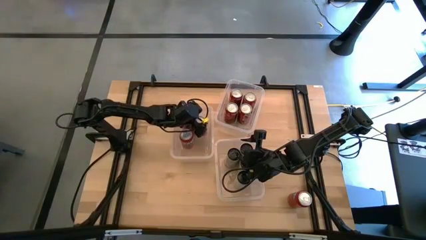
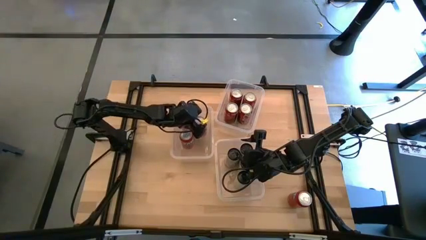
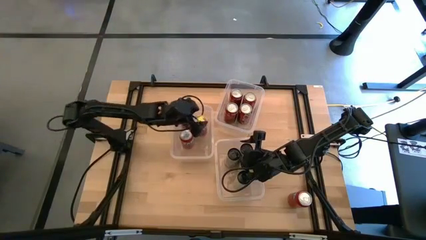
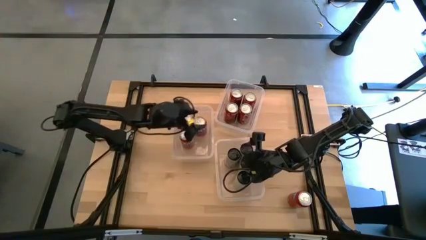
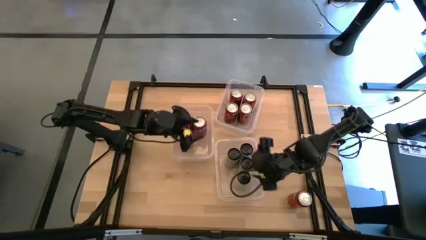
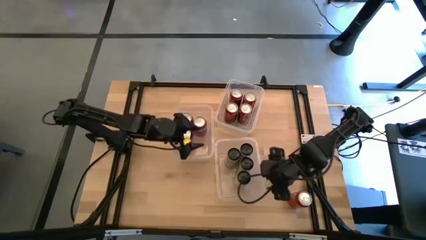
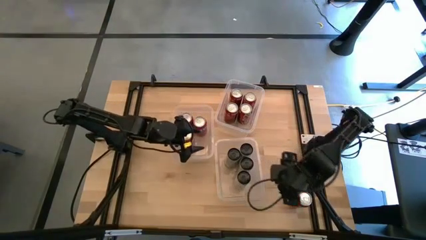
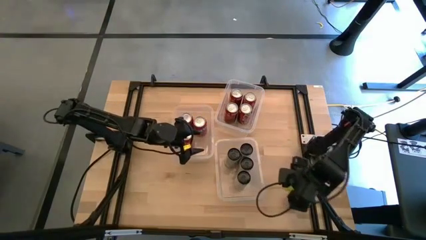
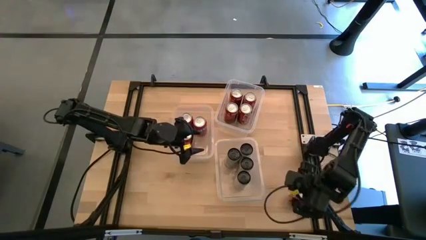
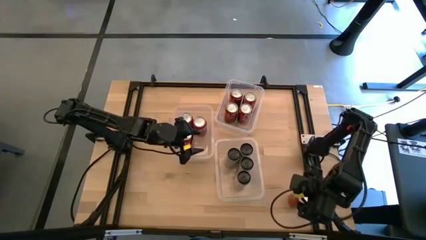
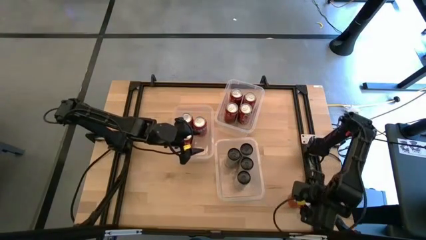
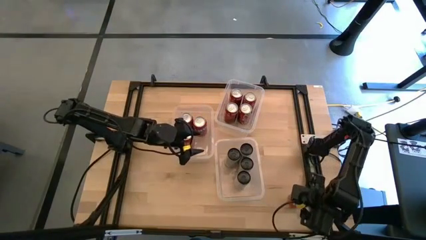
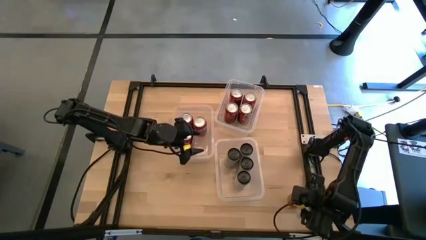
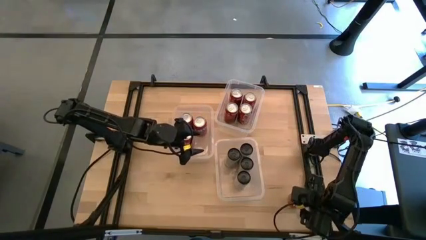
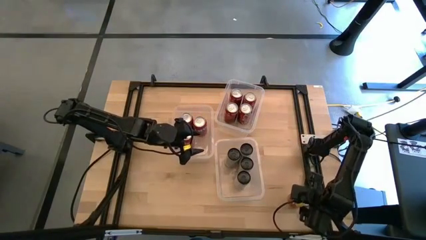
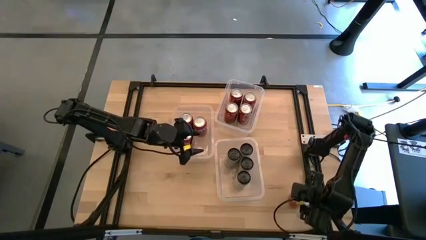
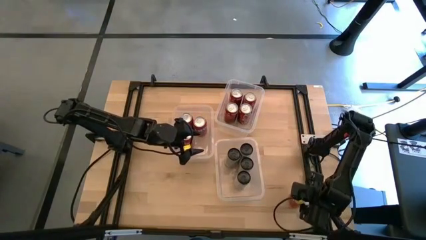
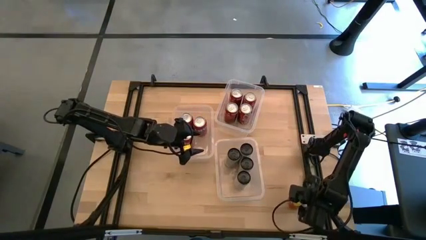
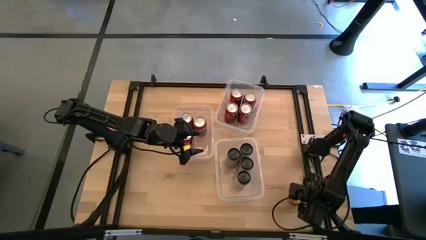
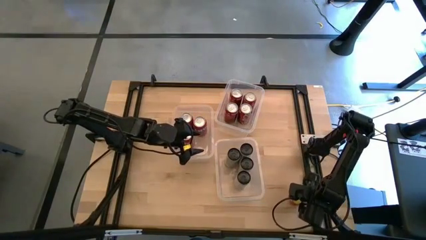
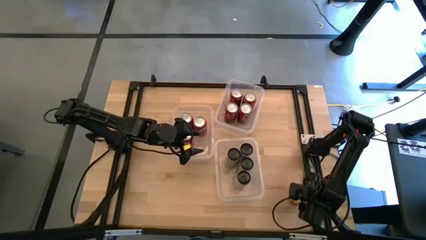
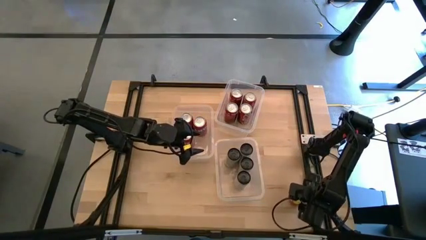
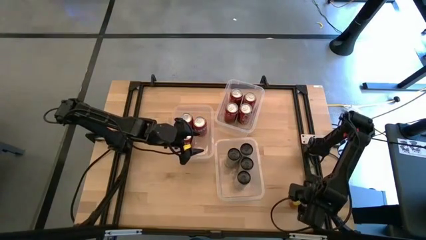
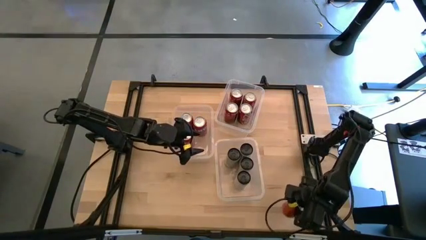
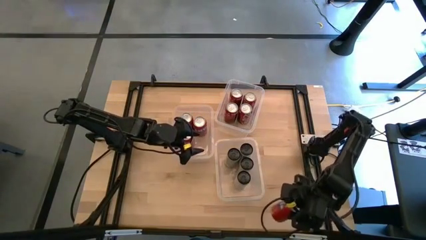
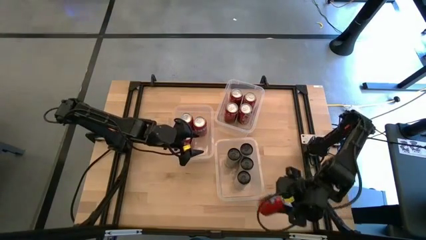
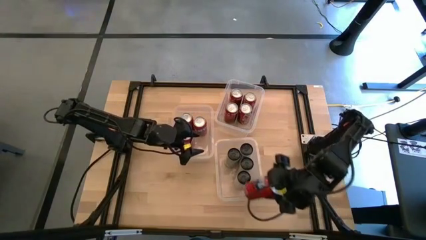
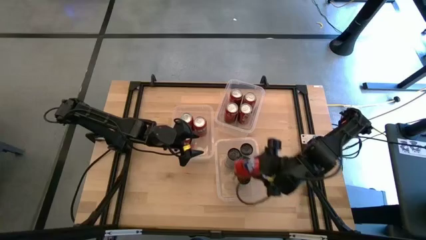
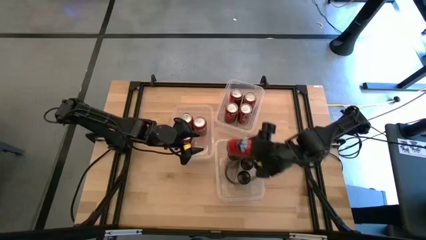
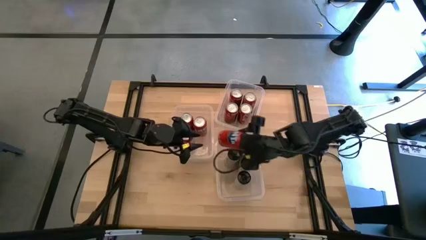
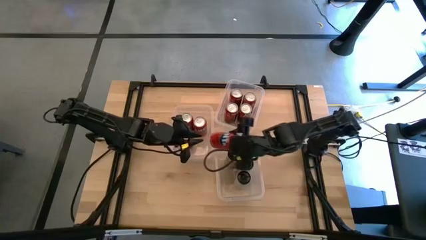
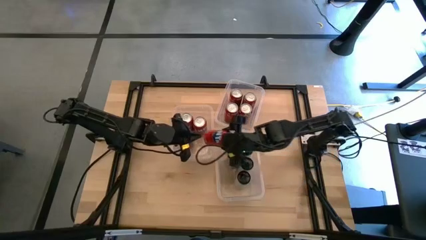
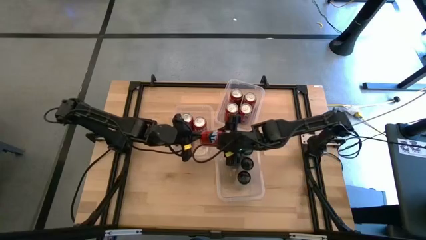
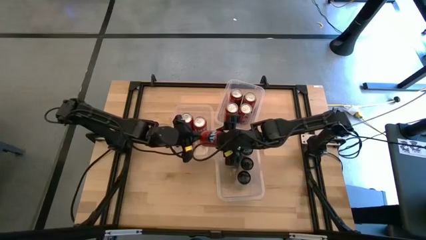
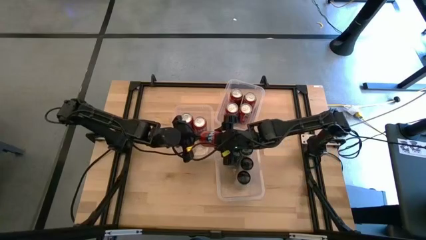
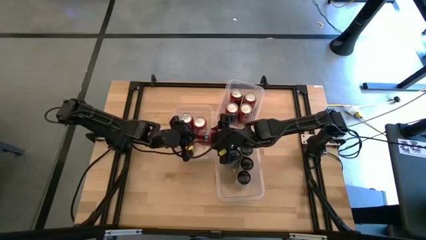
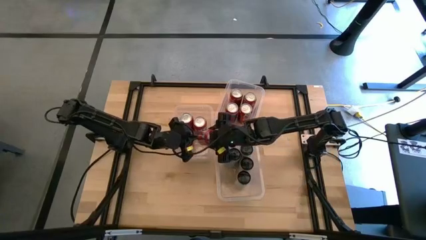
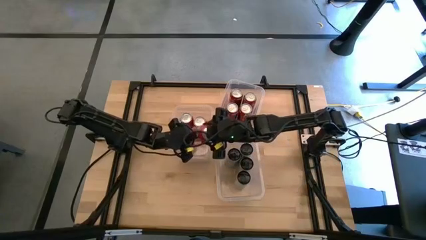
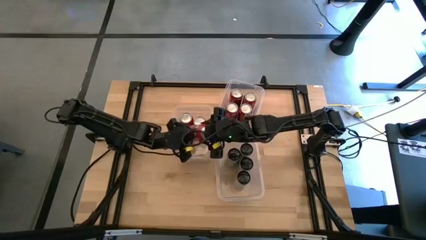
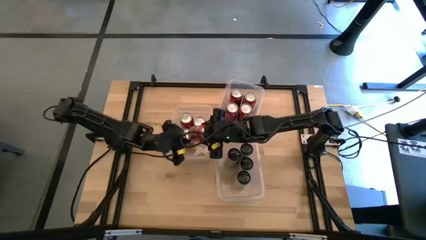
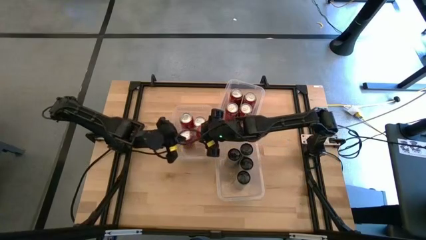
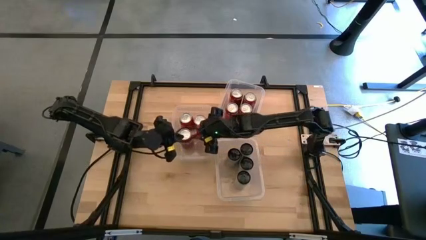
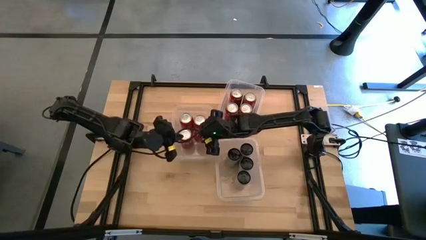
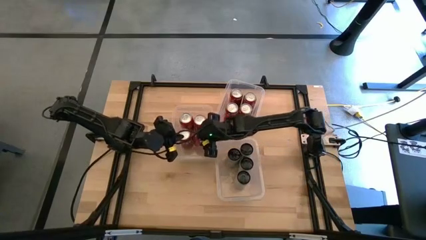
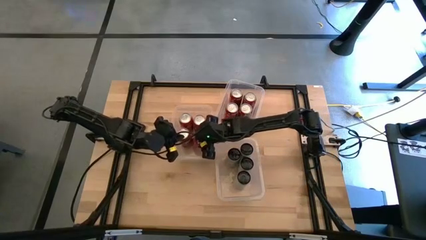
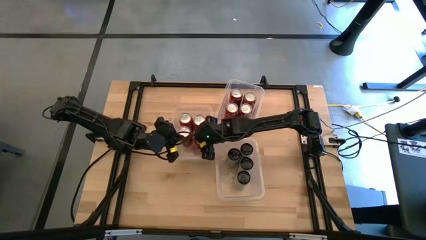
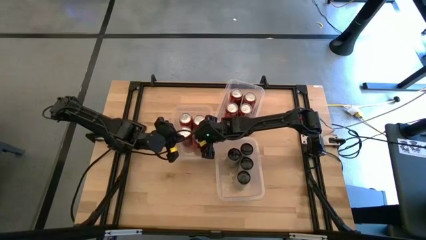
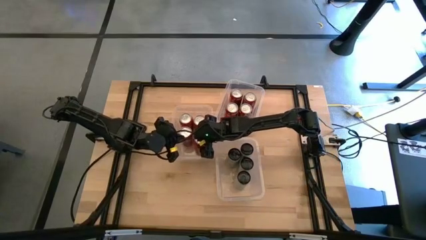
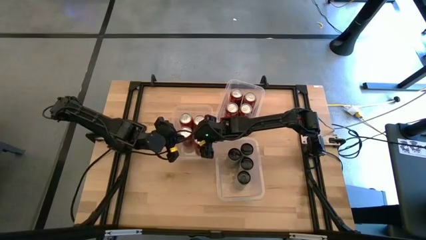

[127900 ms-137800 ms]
Task: Sort soda cans
Put the red soda can into the middle transparent bin

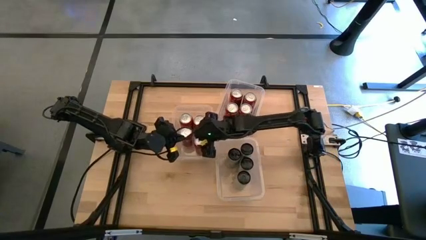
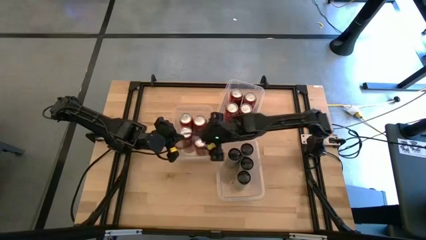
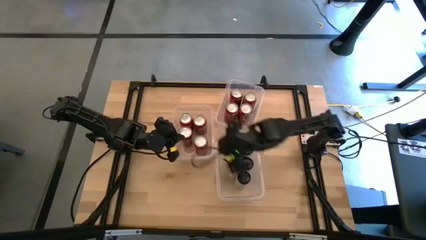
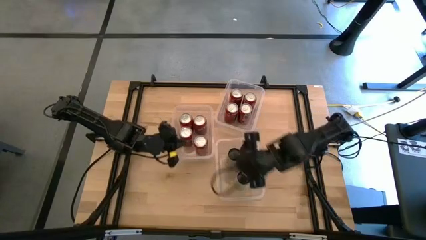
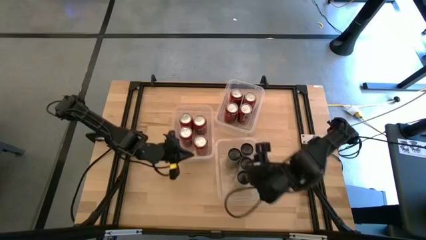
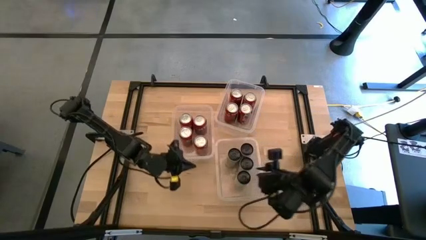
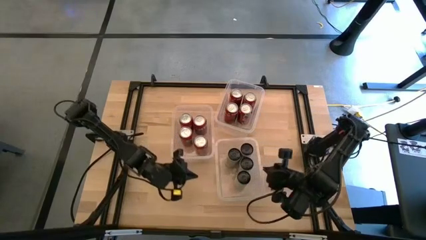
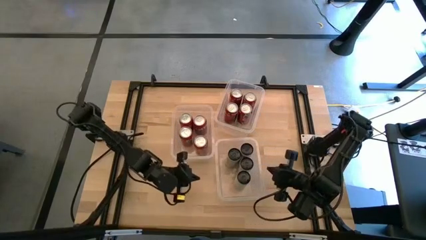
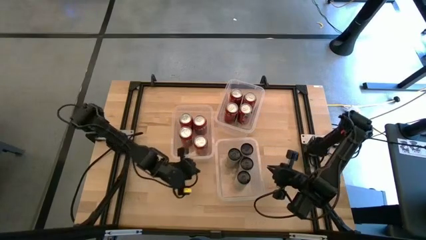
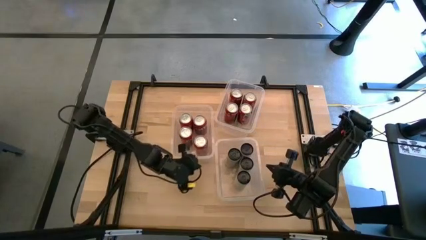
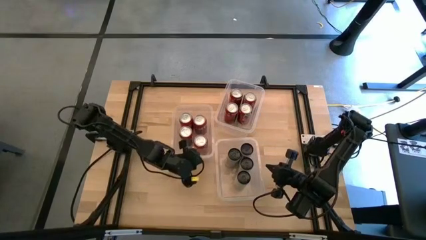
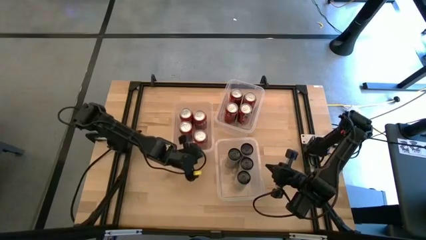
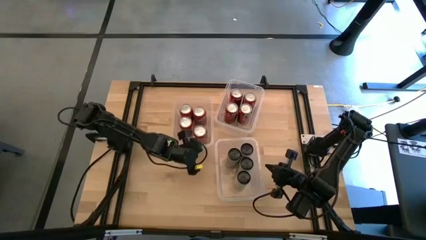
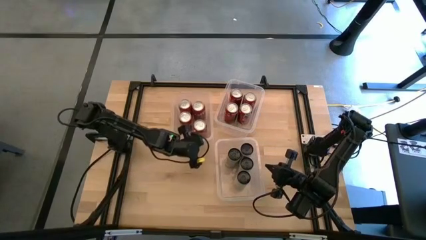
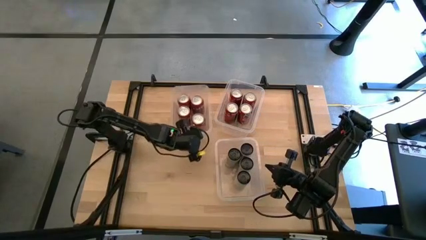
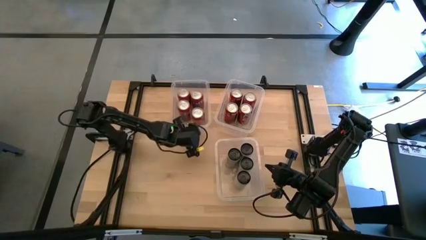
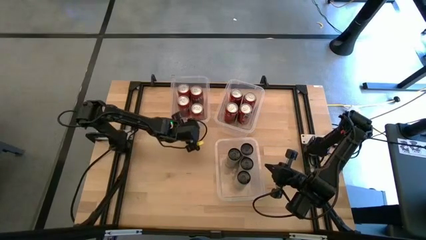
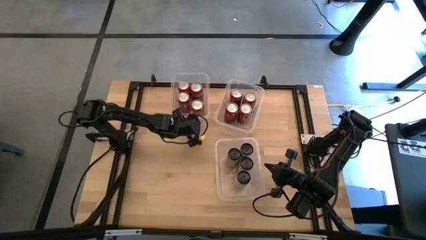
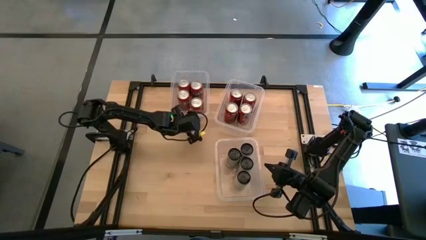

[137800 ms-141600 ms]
Move the middle transparent bin to the top of the table

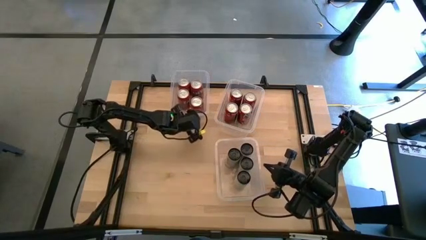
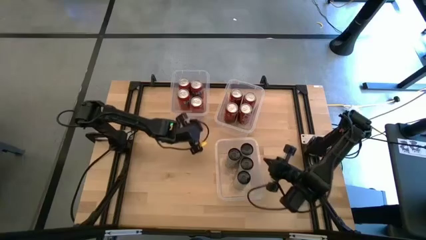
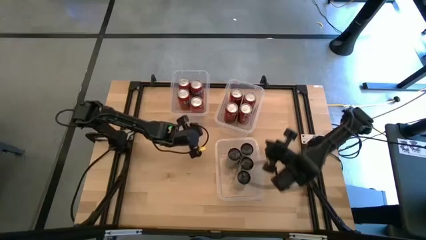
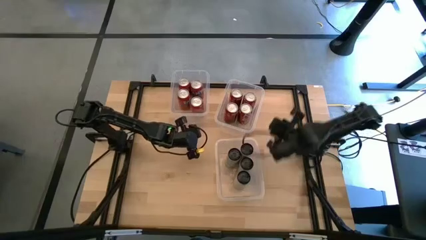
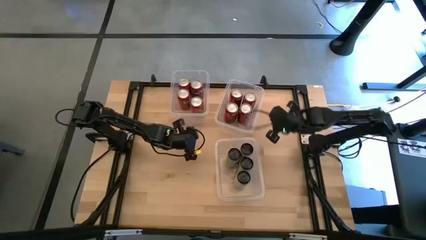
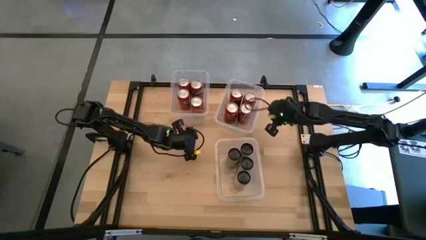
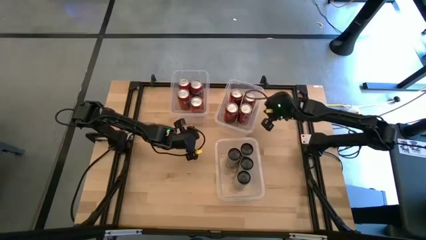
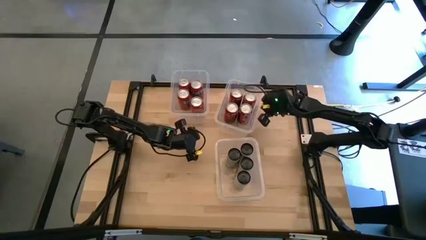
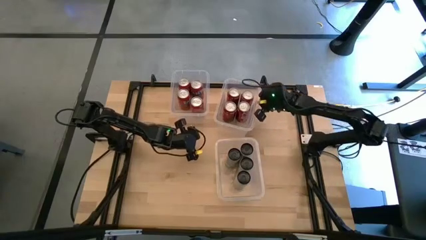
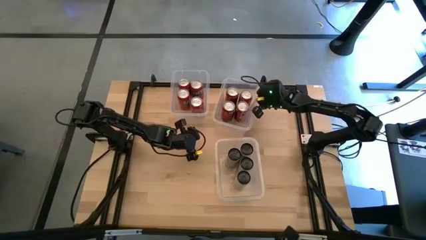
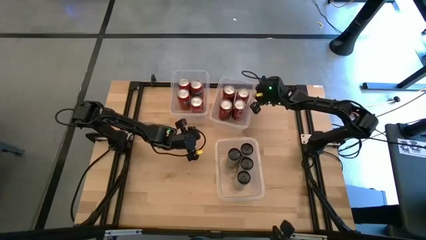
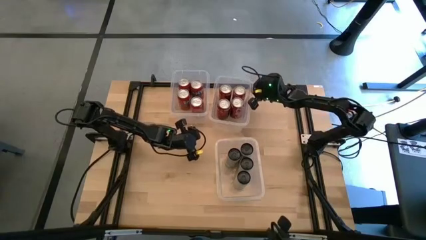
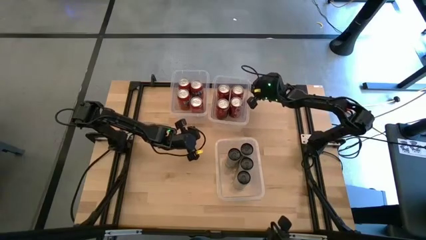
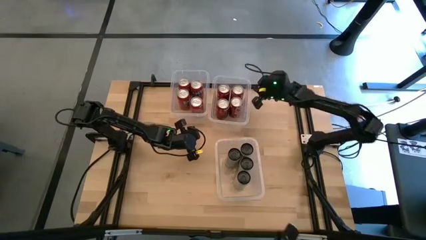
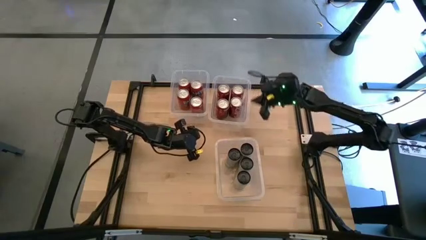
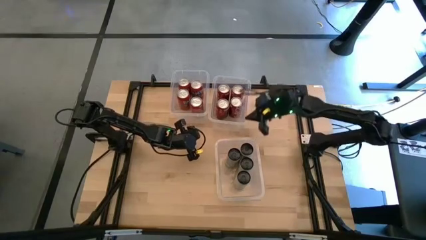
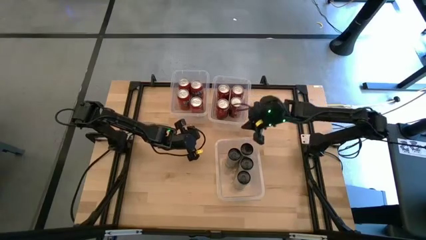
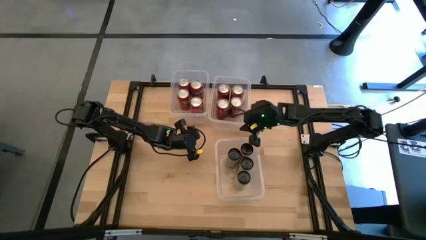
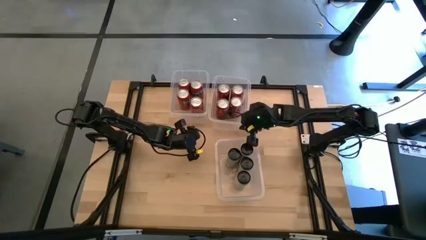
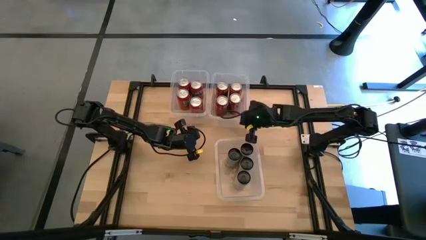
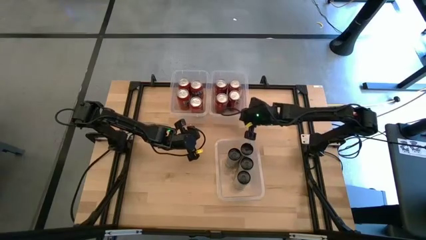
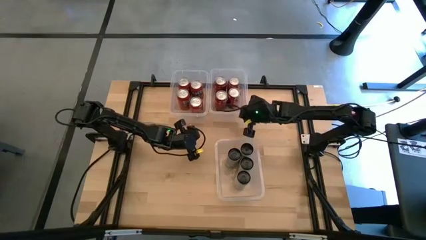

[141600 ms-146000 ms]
Adjust the top transparent bin
